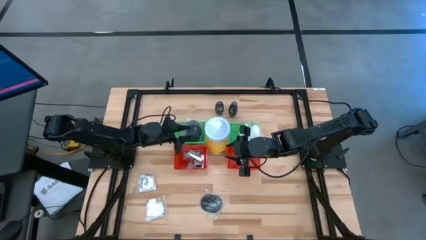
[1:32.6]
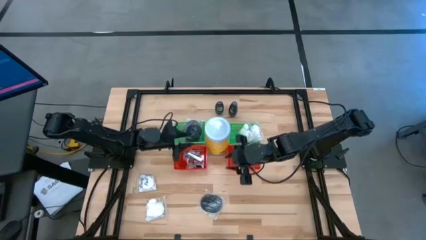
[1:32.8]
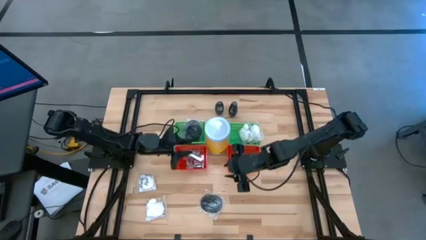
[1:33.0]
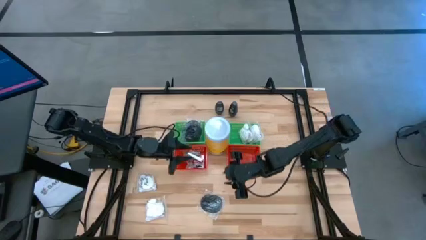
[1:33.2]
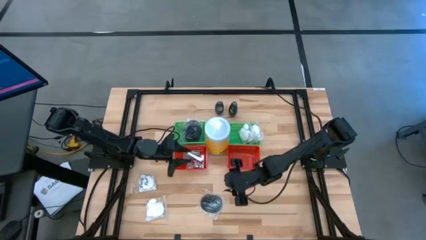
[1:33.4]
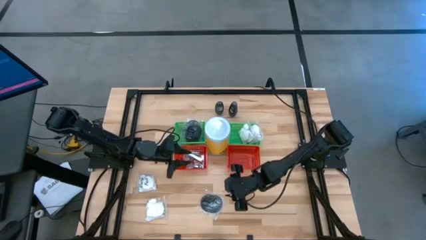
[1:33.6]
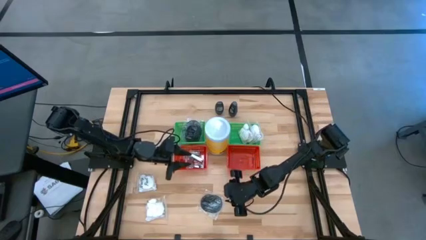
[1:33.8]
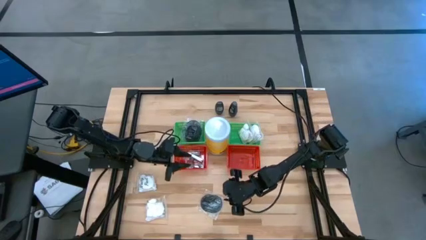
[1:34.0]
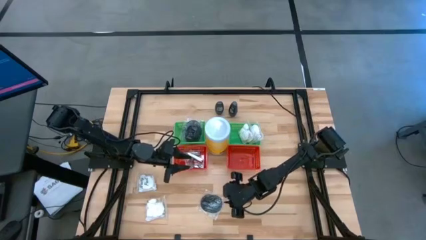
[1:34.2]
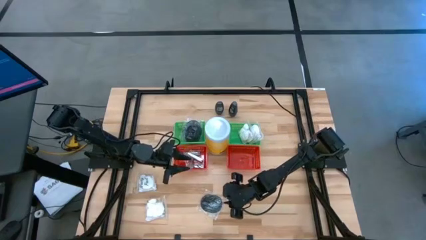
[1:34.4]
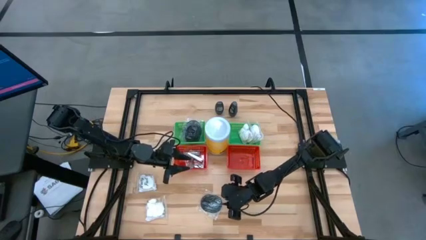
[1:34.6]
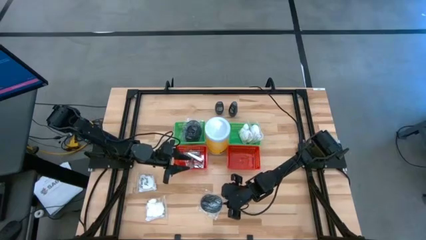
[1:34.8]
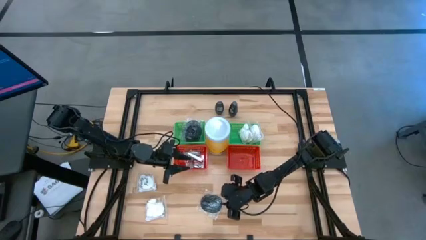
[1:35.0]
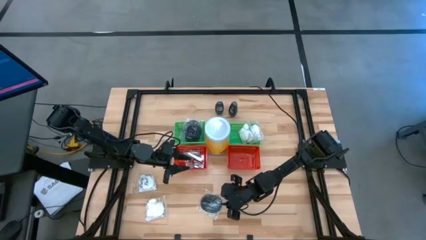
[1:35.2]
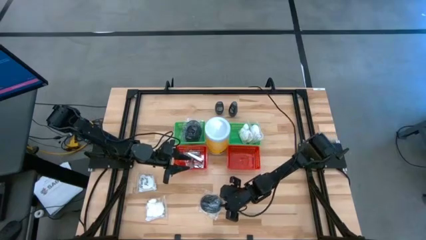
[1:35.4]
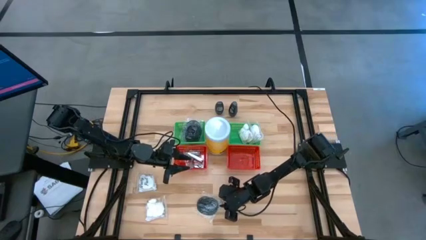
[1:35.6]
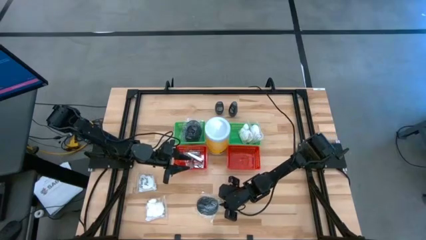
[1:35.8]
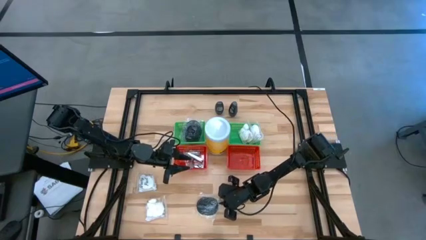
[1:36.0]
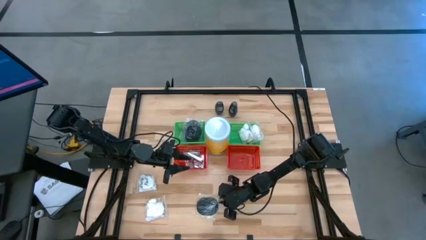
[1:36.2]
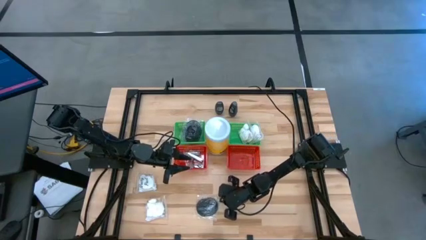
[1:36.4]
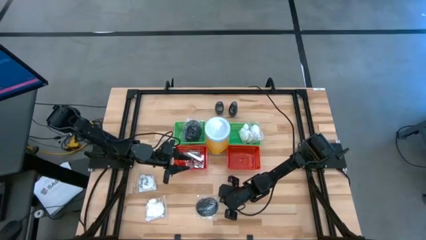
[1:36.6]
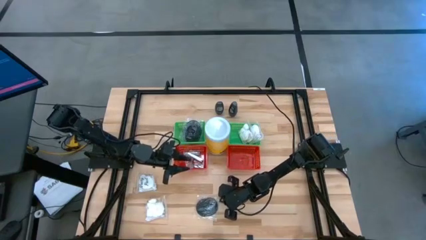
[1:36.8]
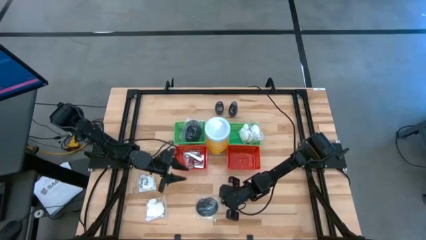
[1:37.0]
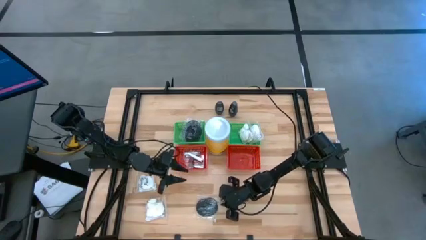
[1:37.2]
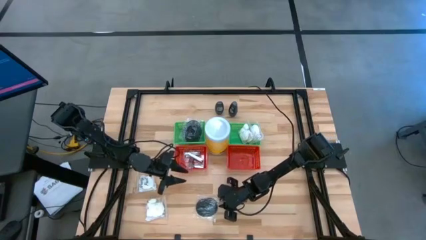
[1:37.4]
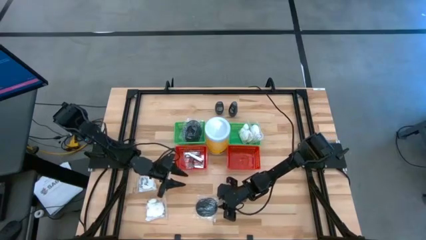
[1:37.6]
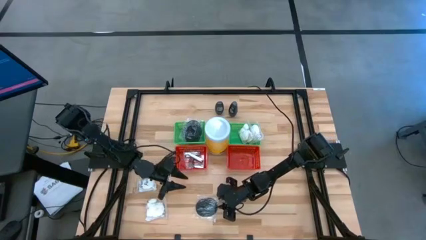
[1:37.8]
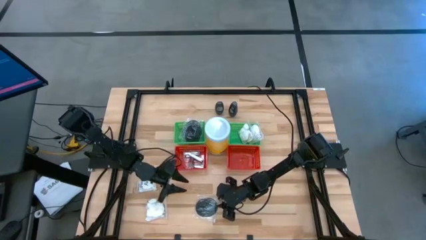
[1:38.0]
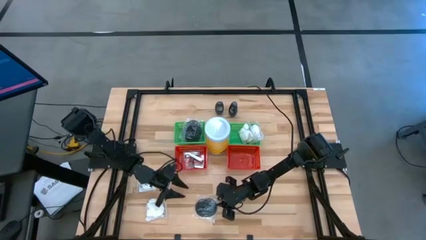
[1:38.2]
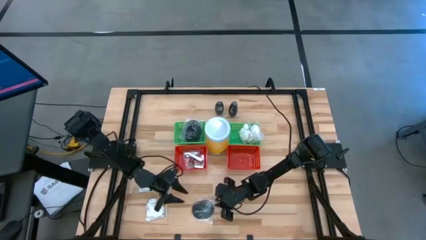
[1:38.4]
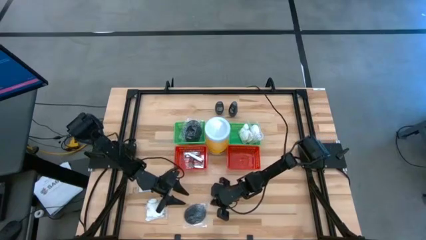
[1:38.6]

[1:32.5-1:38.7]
Task: Pick & Place Travel size toiletries
Put the hairbrush into the left green basket

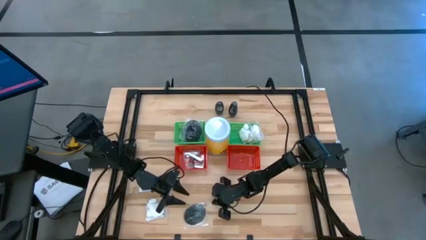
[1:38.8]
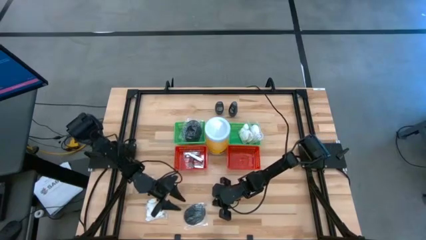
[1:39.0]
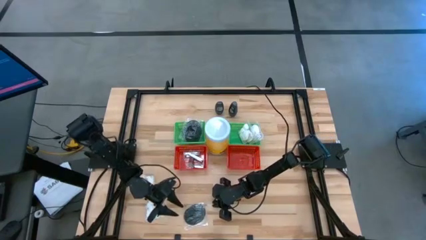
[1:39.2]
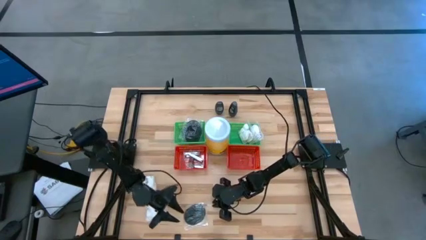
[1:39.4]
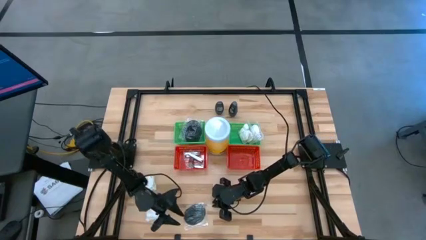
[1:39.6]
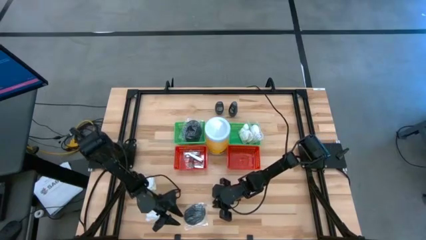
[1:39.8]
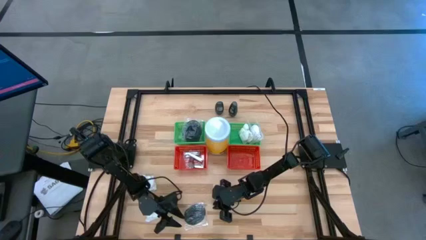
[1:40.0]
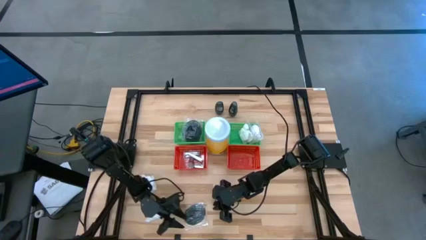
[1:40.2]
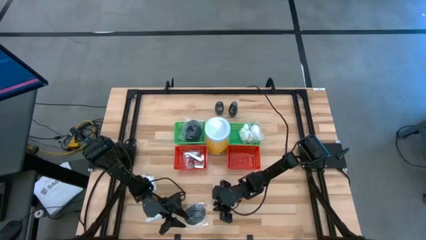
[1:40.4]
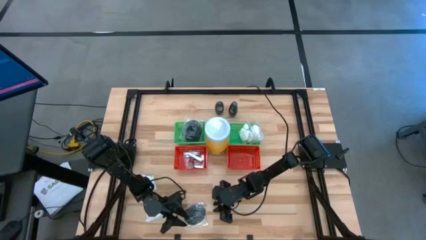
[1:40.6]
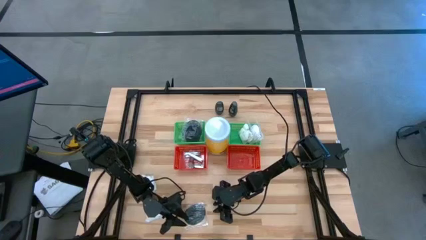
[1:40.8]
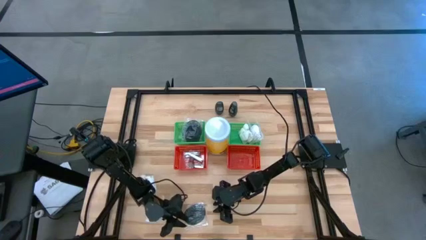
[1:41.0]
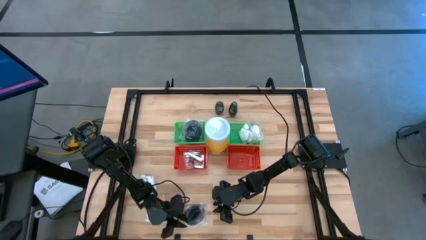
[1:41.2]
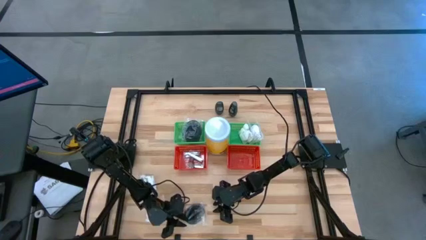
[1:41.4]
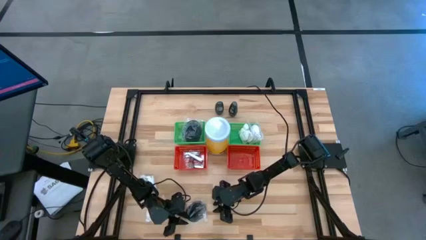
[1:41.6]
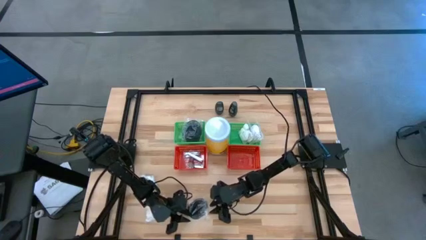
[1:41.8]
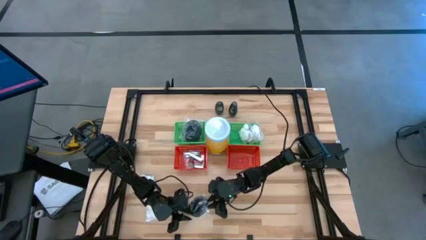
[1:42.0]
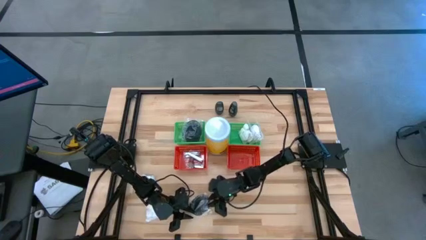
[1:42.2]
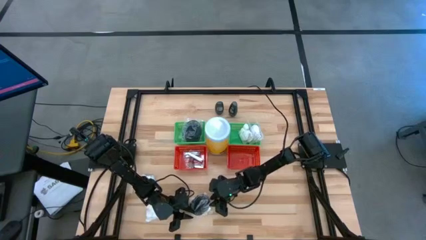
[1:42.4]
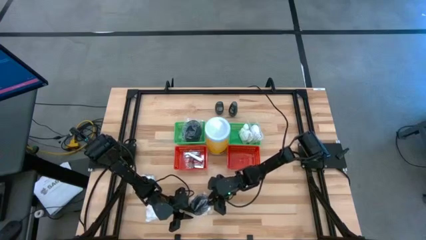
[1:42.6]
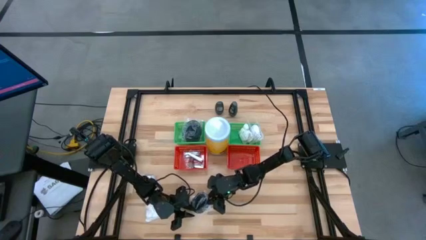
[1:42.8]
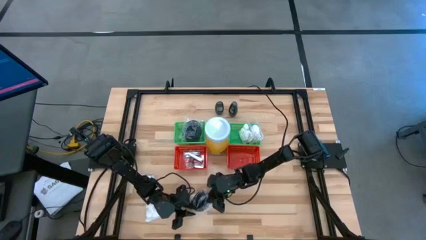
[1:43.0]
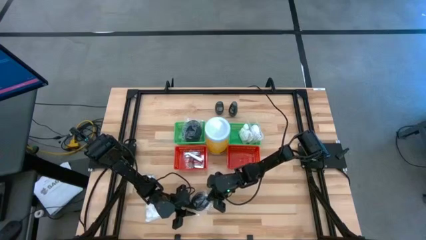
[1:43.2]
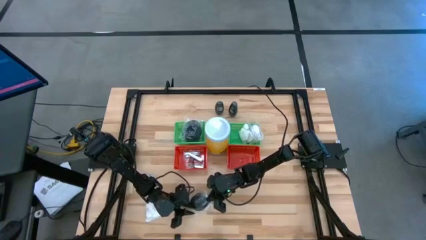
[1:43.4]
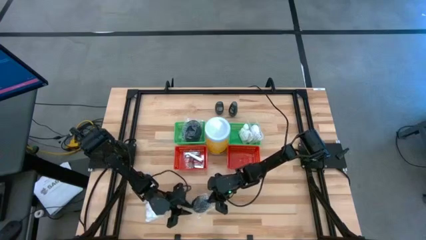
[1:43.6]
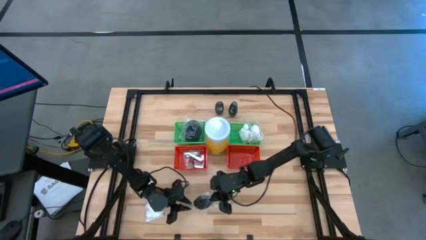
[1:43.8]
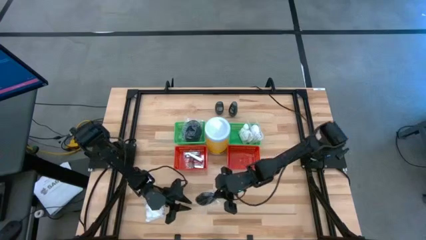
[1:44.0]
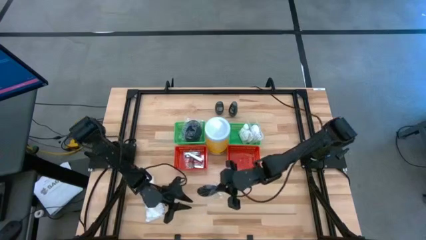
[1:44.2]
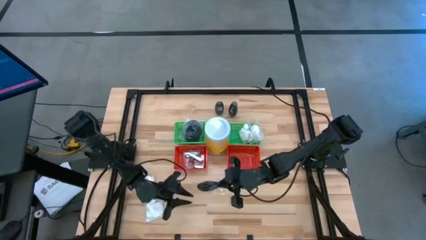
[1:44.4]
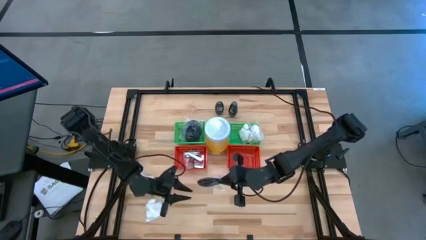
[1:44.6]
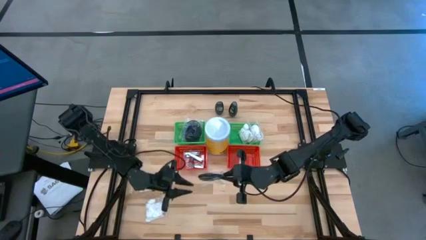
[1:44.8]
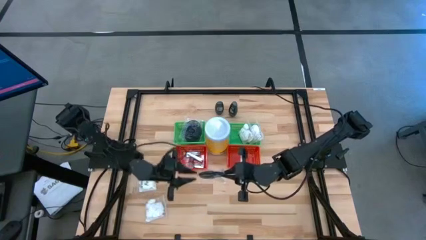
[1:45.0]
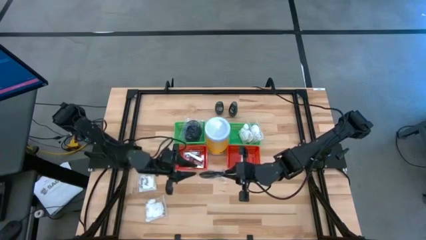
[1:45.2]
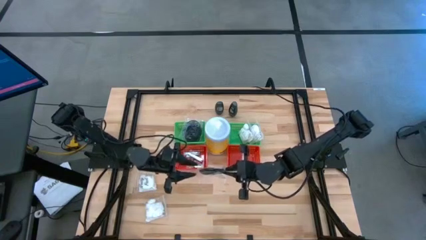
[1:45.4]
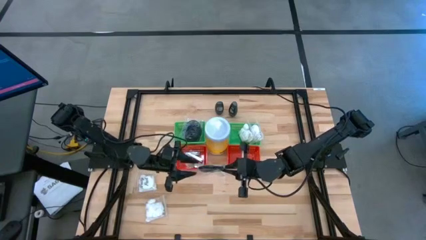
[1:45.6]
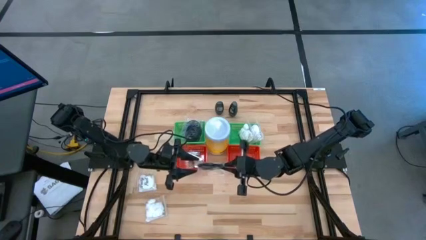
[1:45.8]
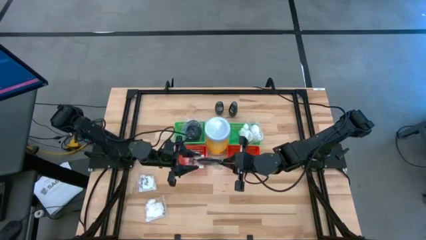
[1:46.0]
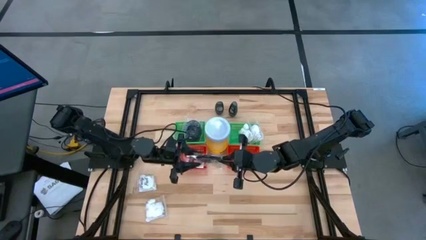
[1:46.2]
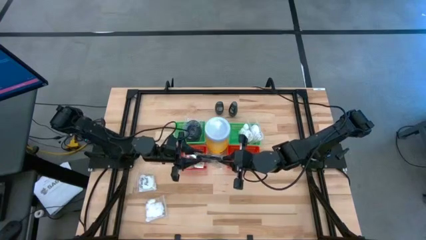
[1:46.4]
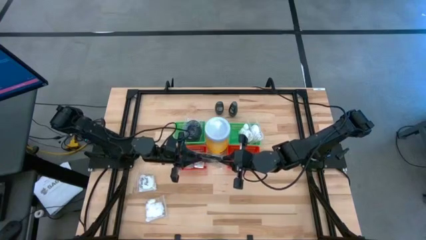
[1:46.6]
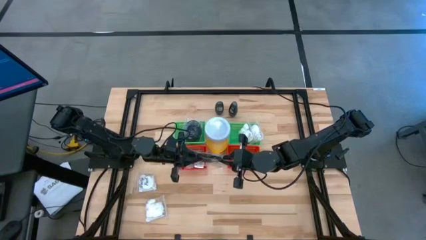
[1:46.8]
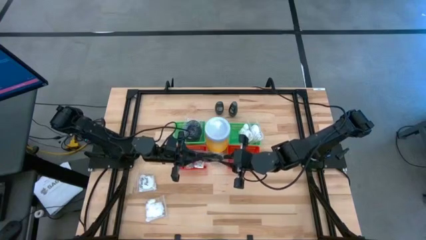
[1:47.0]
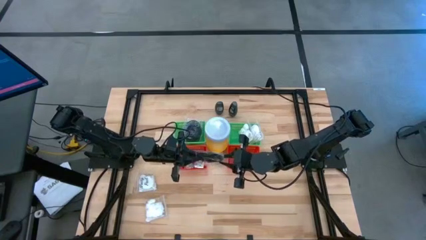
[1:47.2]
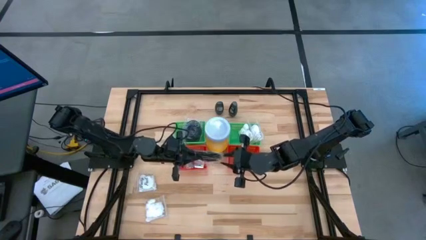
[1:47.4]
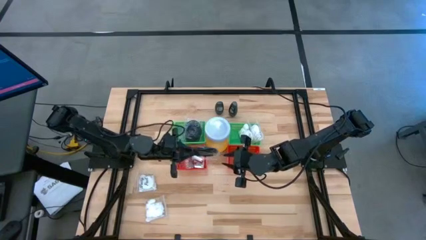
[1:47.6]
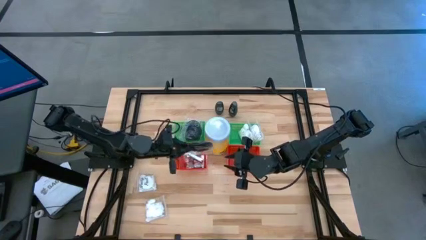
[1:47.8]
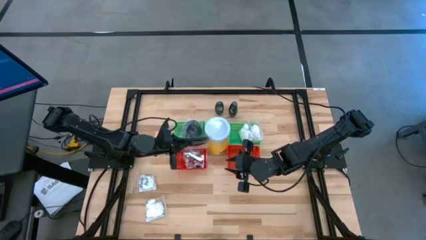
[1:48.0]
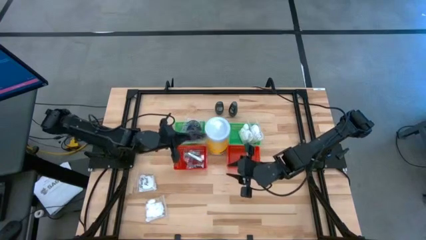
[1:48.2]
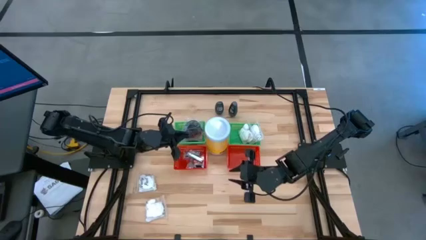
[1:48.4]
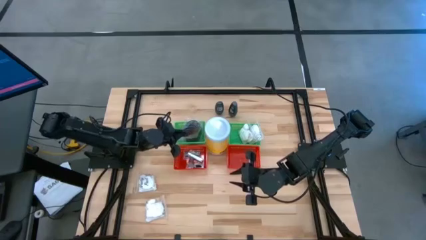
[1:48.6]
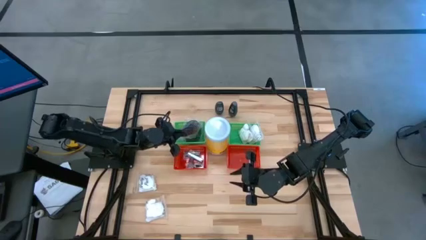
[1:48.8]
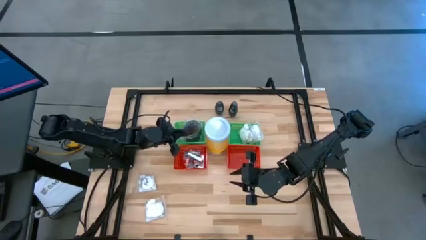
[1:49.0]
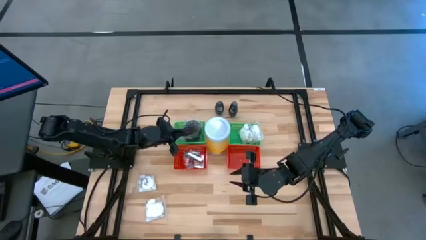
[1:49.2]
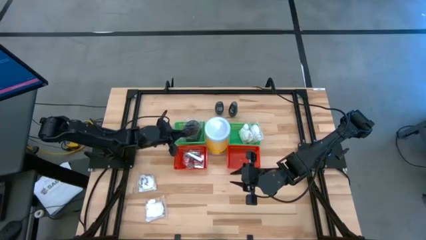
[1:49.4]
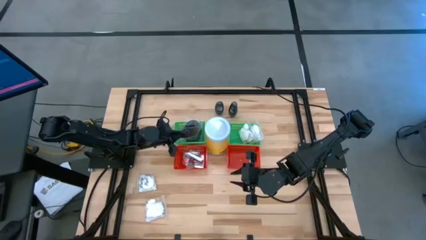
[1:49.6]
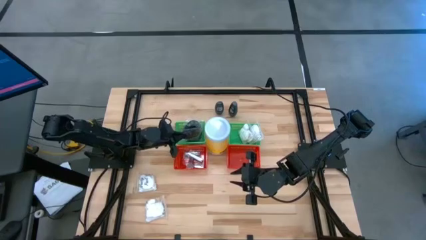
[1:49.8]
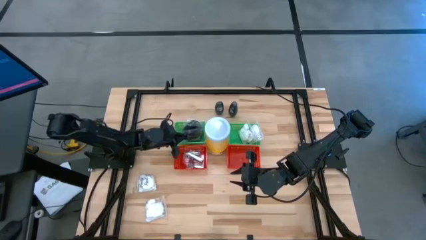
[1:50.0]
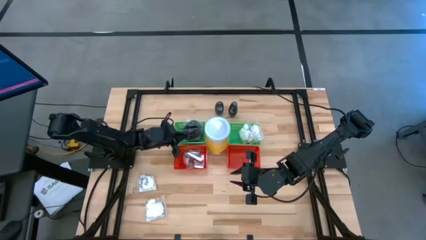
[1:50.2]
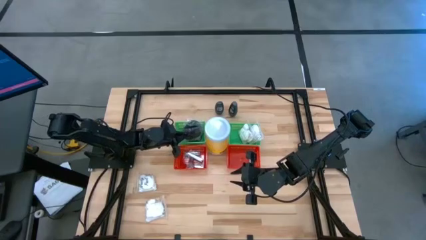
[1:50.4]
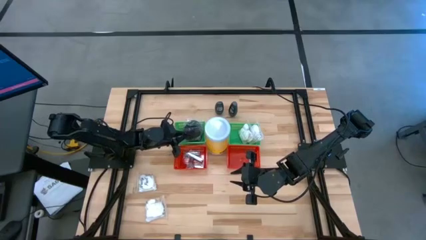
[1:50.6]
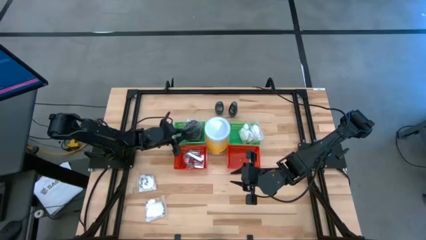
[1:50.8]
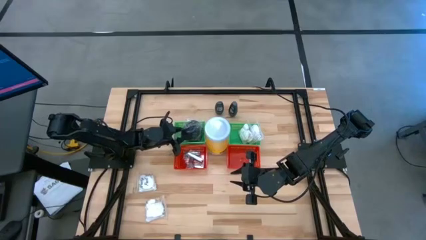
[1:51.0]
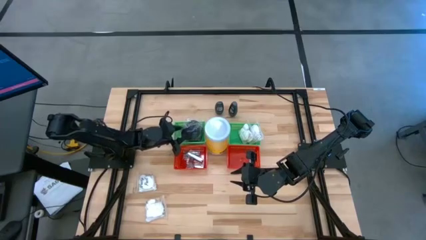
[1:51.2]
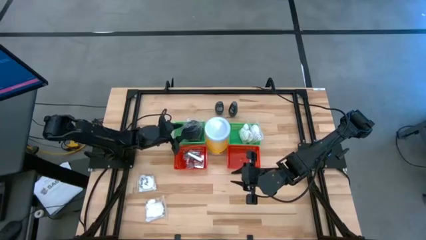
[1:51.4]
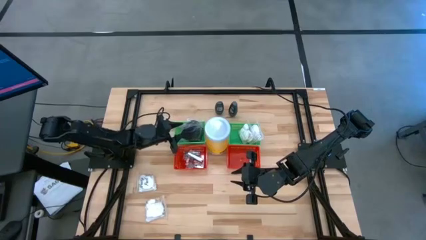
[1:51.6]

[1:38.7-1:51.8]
Put the hairbrush into the left green basket
